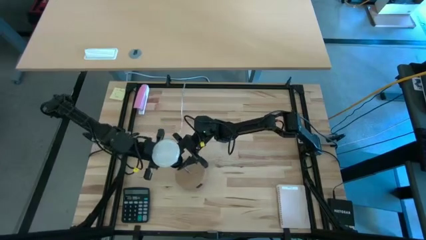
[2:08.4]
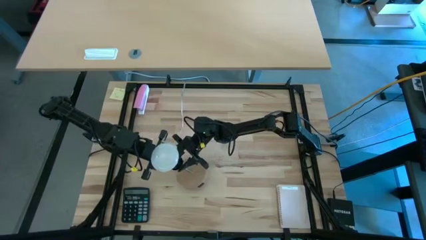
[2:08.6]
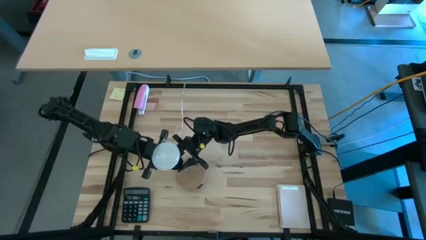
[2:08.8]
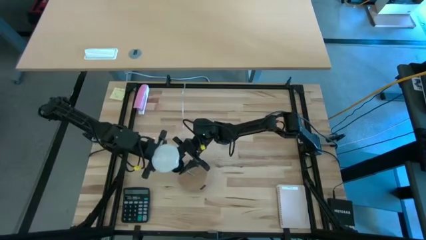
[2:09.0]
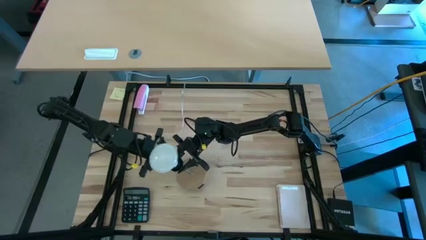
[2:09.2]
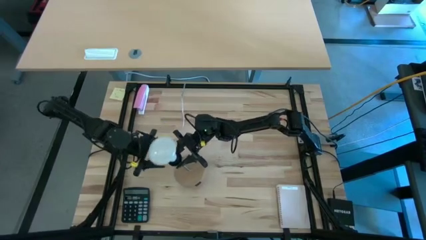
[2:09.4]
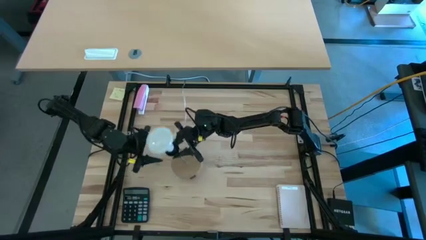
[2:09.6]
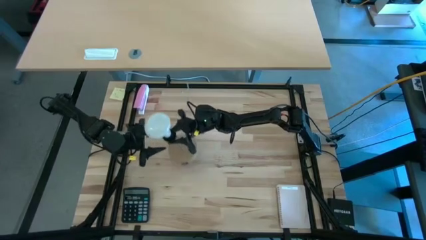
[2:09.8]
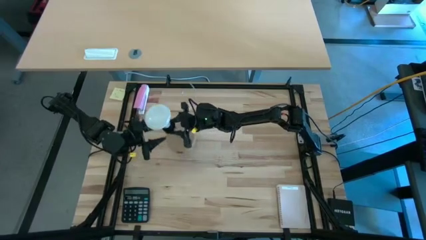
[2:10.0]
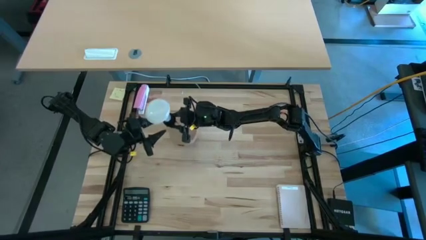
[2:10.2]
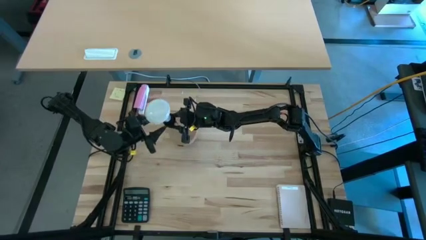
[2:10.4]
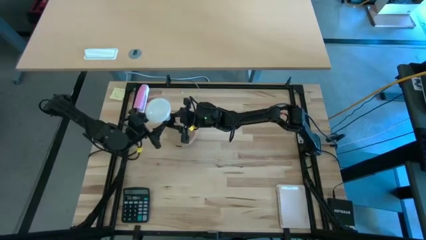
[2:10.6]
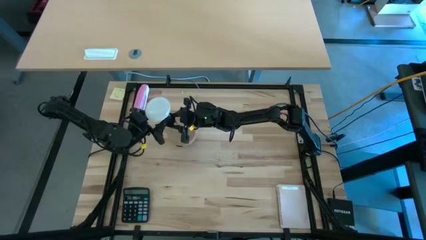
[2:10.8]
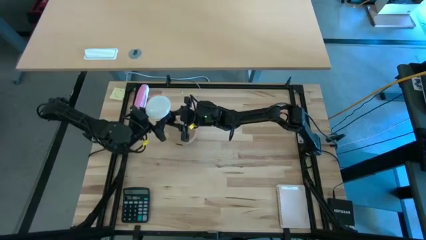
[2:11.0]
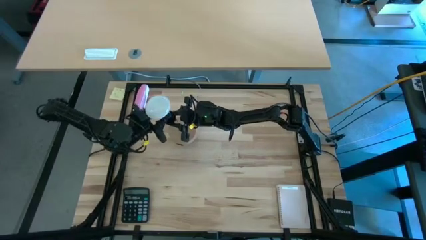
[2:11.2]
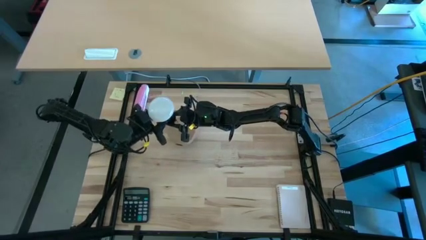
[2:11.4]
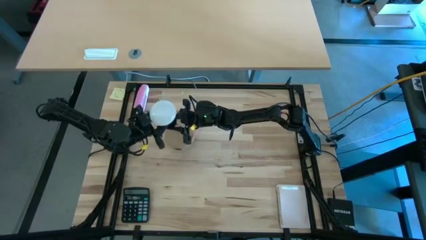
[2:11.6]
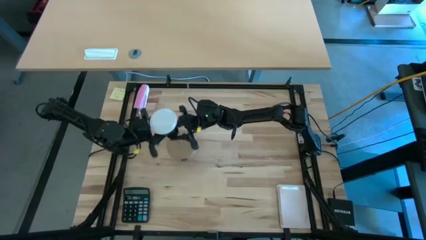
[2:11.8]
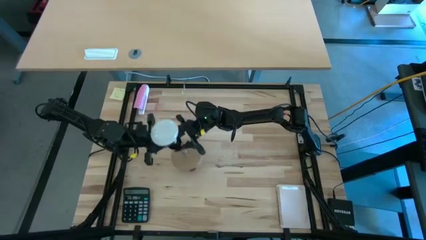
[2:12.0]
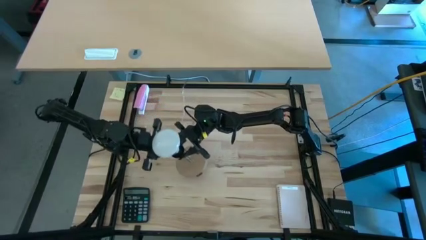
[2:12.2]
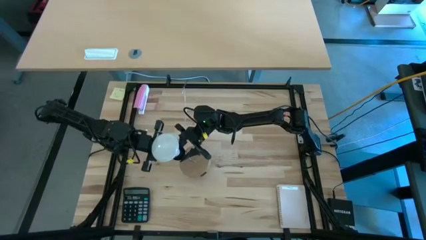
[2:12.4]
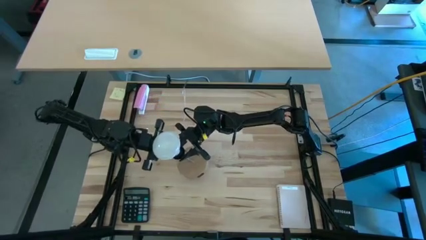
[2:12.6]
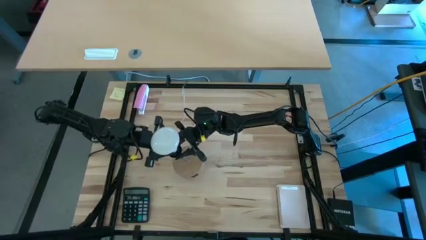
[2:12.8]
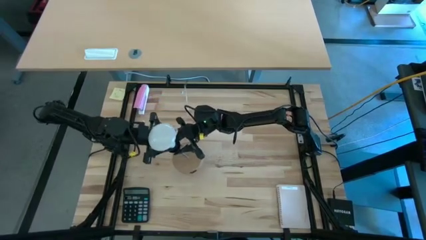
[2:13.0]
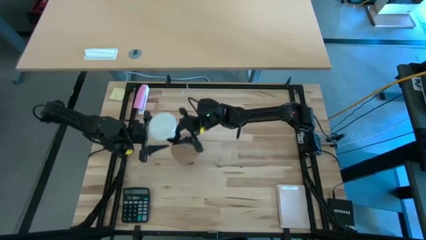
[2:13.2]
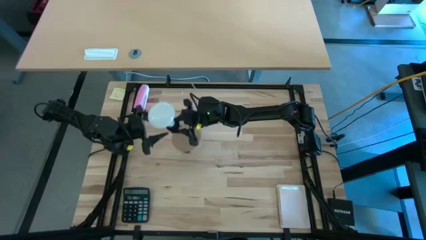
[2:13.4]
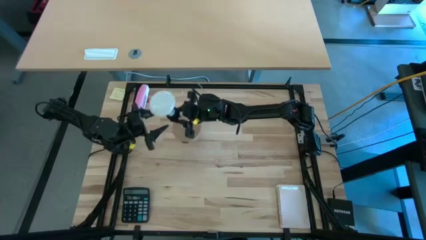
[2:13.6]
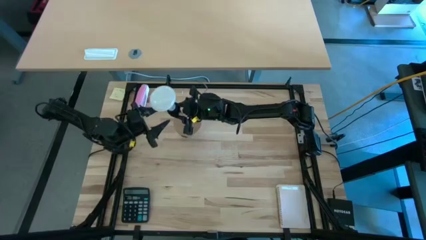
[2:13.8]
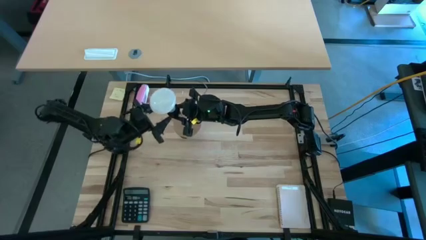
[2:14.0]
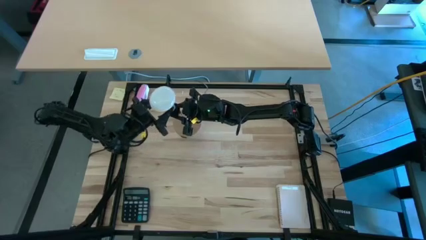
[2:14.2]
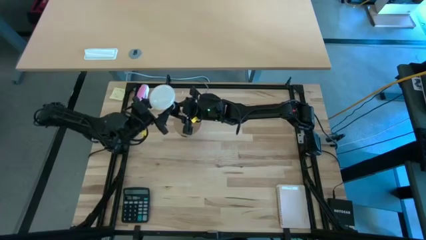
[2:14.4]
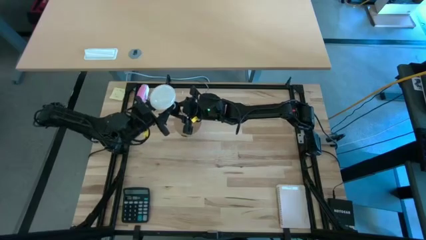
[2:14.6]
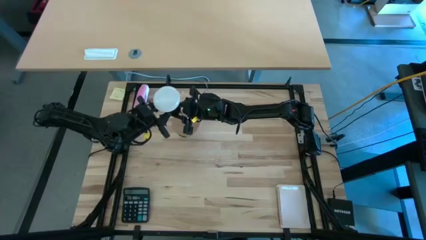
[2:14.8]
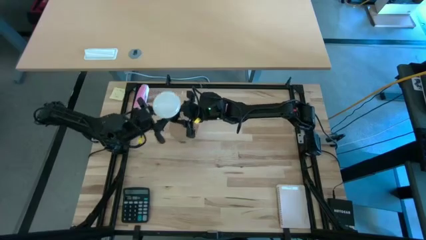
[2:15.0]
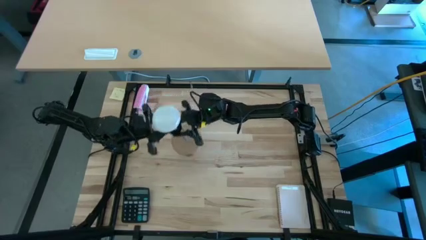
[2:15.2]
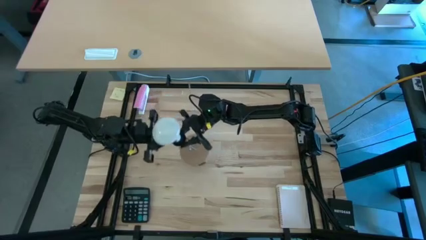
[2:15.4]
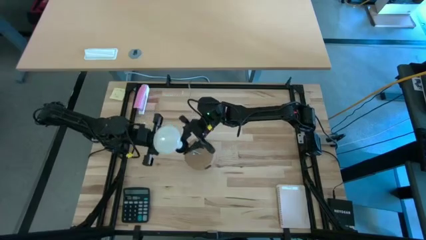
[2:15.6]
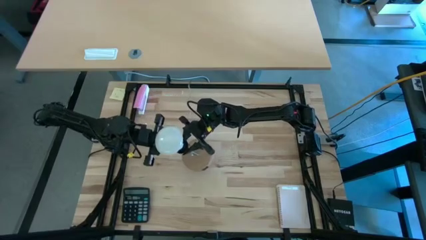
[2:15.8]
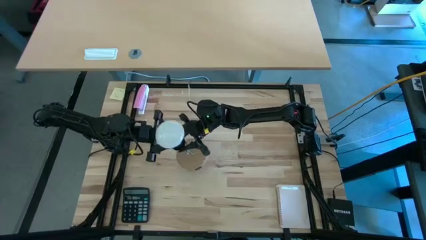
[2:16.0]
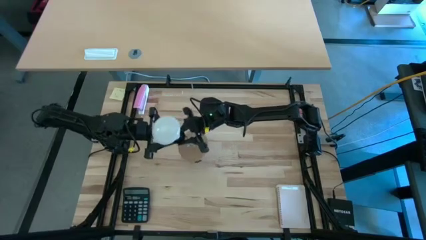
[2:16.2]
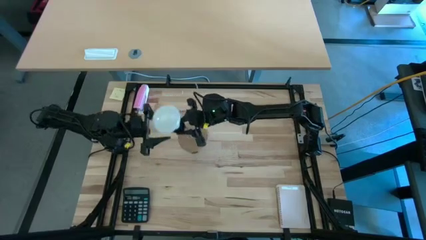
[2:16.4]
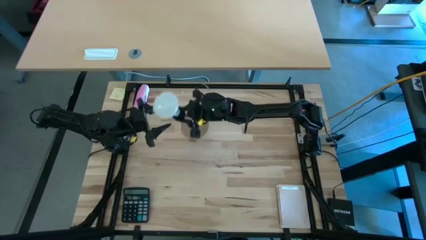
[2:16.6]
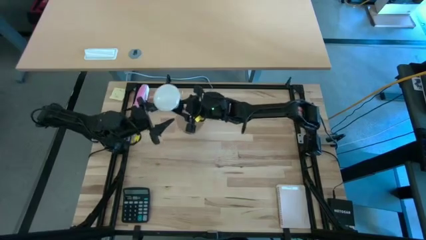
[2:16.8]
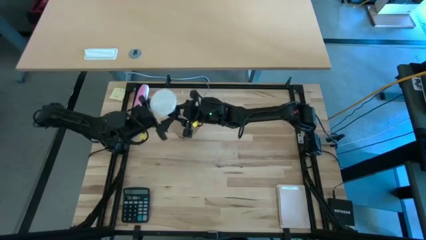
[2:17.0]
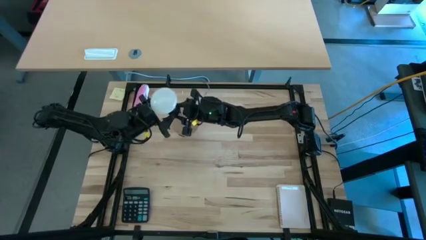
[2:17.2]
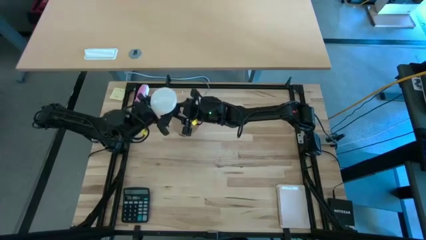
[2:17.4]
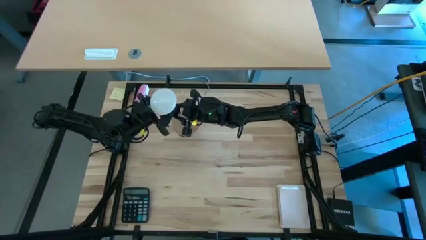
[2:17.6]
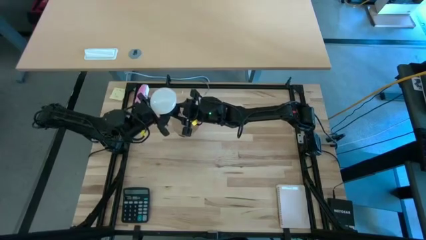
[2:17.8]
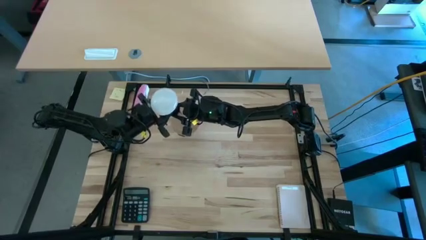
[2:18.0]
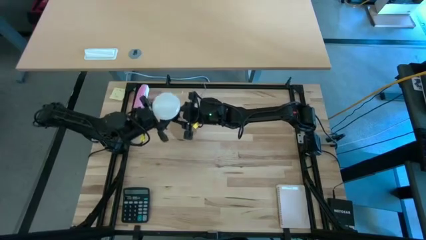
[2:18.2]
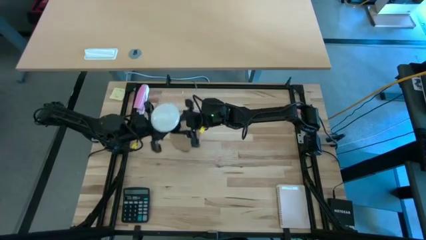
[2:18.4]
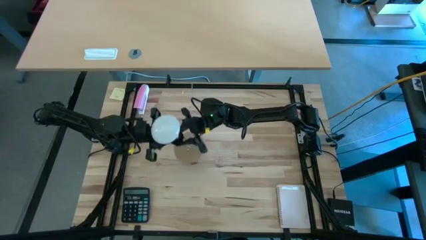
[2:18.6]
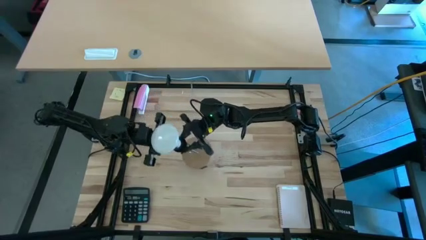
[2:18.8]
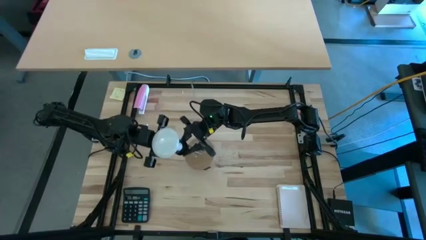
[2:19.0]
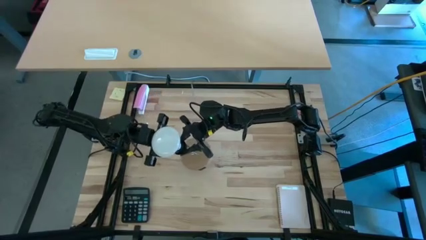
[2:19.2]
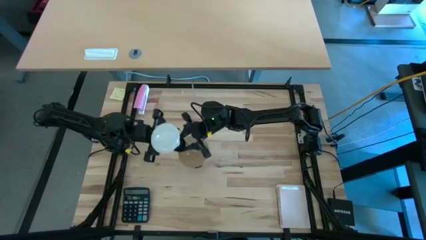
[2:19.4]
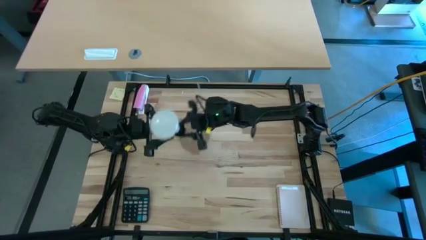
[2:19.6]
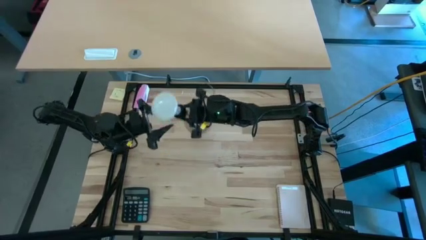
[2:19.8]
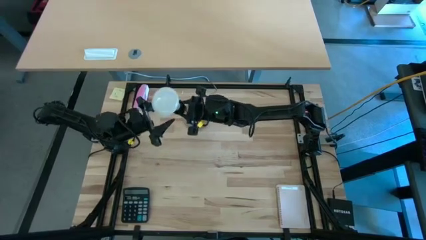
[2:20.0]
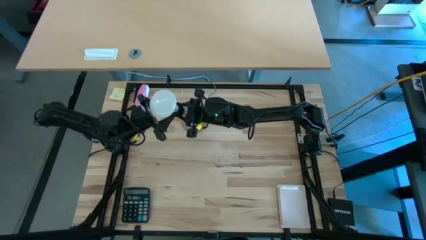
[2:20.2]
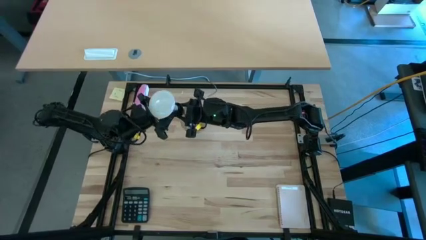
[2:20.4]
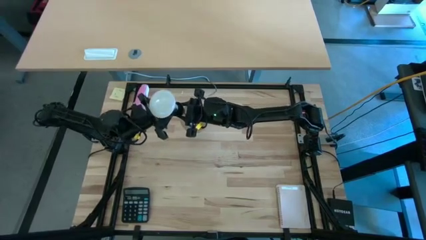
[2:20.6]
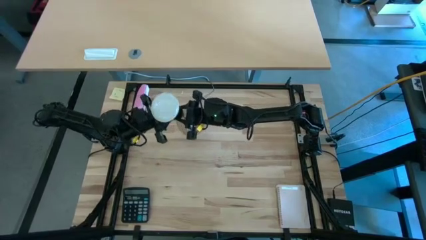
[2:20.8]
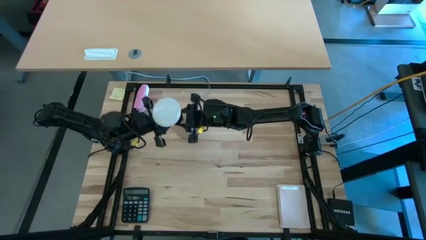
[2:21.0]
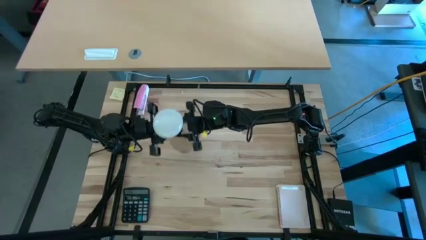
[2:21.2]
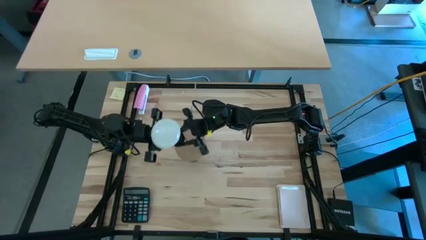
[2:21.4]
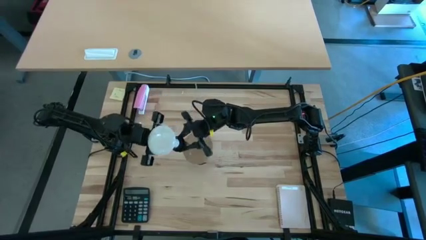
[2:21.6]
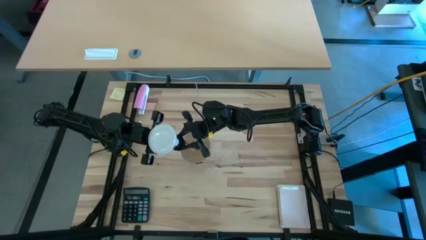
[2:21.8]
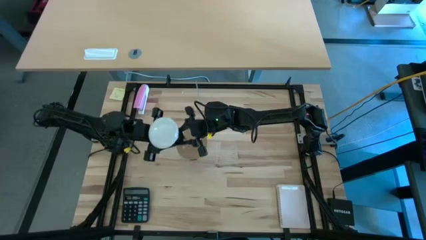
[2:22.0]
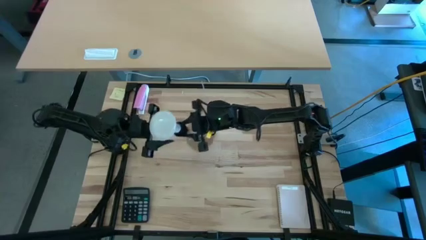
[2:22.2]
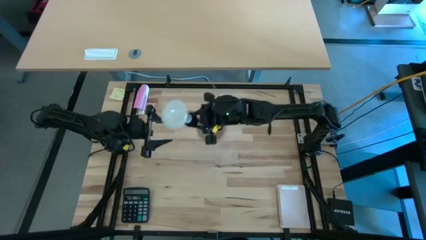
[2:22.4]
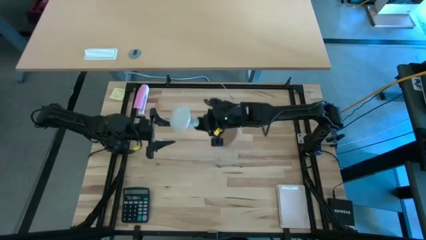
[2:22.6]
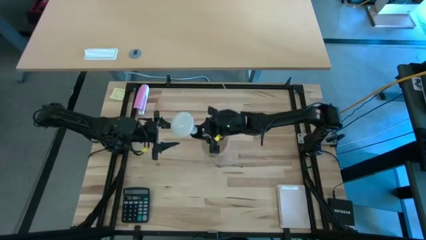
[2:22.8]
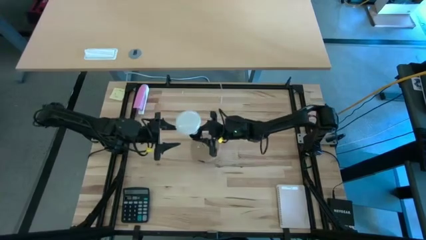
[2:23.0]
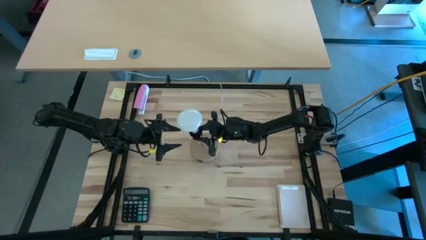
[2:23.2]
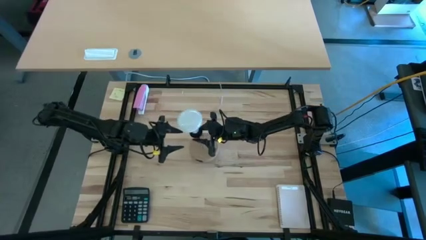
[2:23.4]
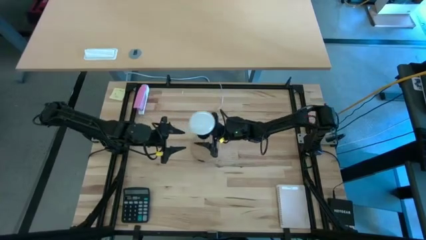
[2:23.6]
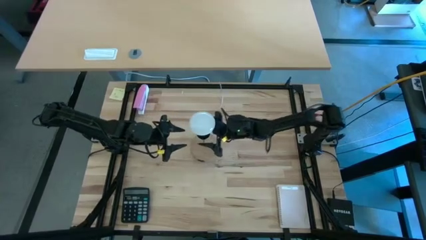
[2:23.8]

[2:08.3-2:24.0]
Task: Screw lightbulb
Insert the lightbulb into the desk lamp

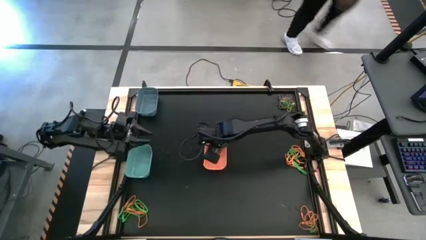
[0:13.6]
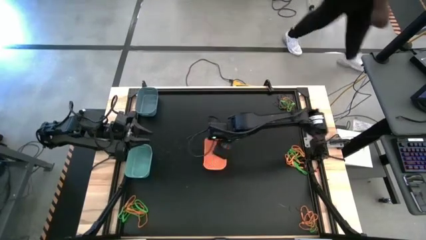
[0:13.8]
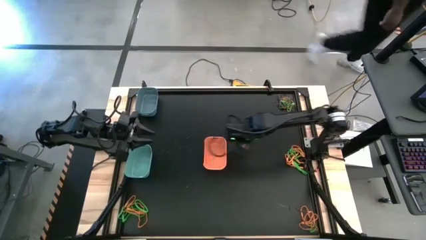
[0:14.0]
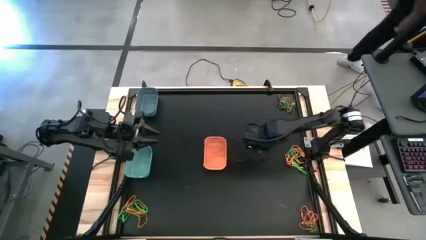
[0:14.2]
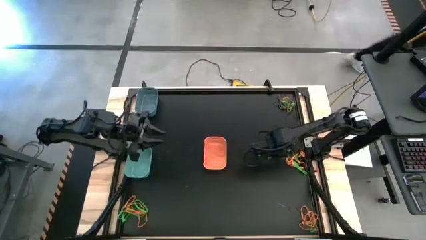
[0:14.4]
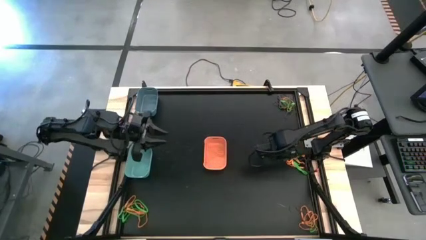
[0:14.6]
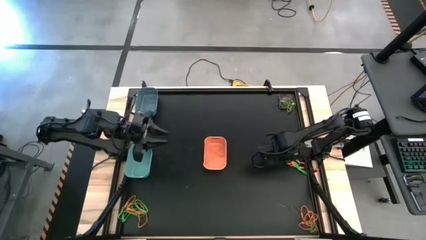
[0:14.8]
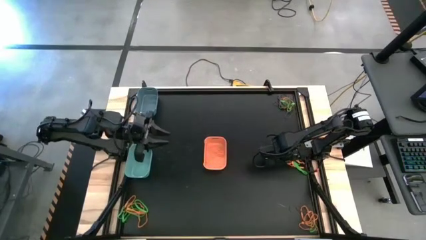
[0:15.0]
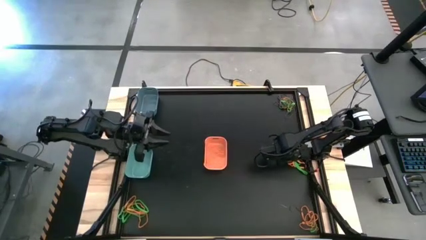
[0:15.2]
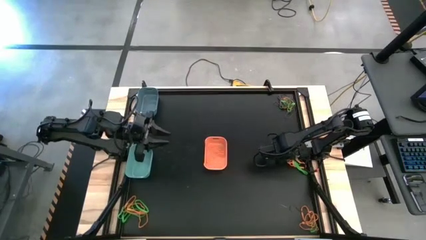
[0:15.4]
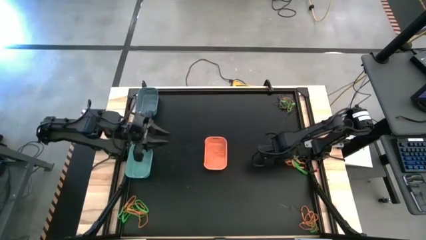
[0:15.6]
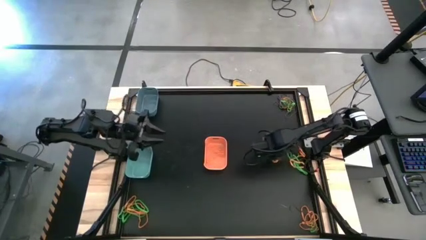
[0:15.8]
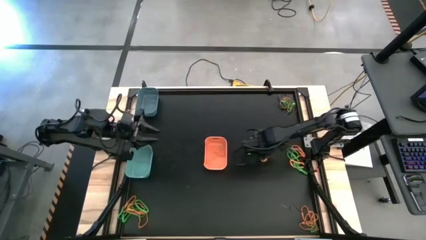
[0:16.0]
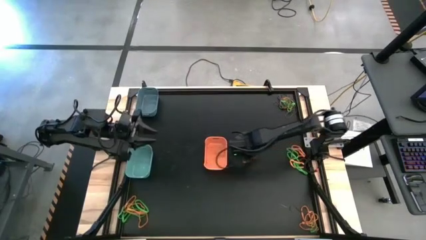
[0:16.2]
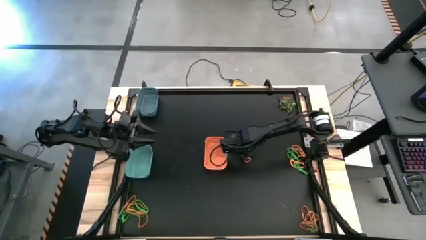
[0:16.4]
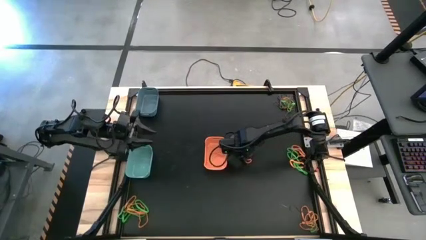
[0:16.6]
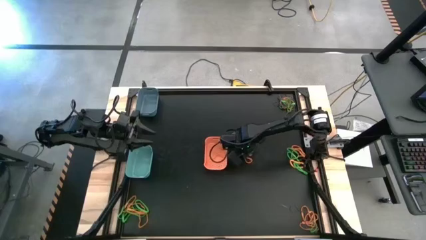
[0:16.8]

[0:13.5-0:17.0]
Task: Sort rubber bands into baskets
Put the orange rubber band into the orange bin
